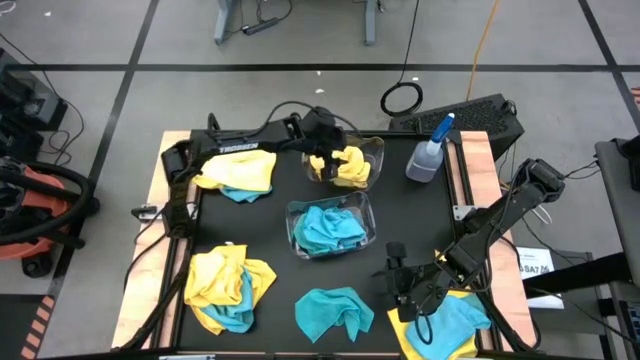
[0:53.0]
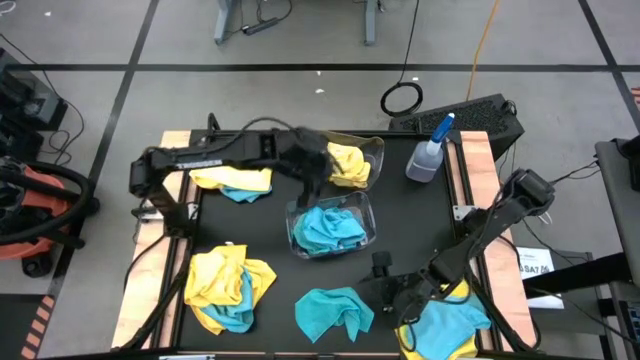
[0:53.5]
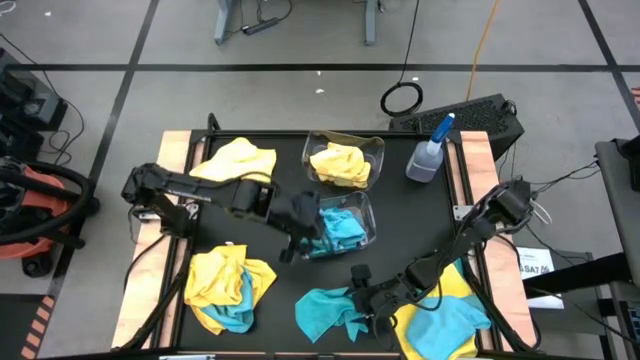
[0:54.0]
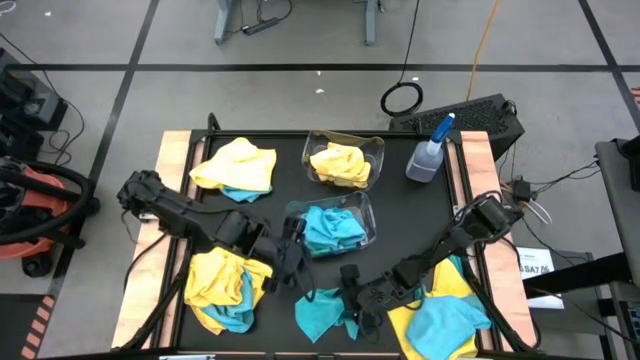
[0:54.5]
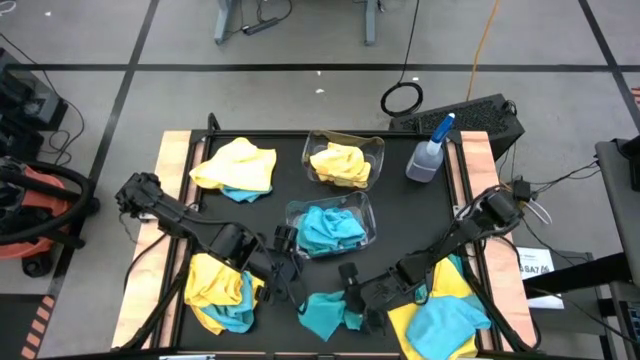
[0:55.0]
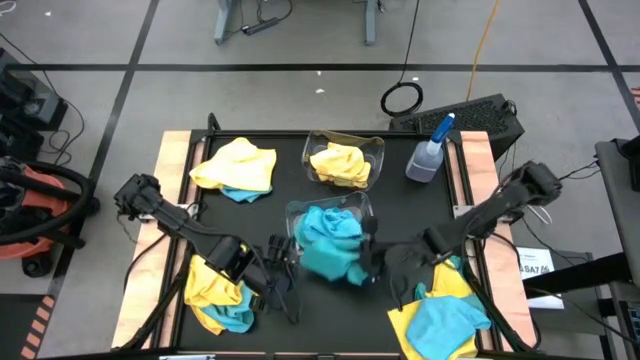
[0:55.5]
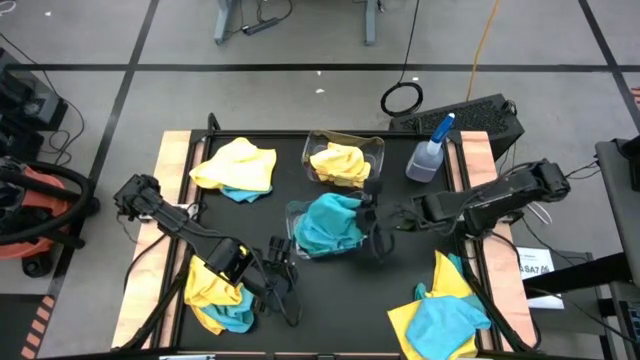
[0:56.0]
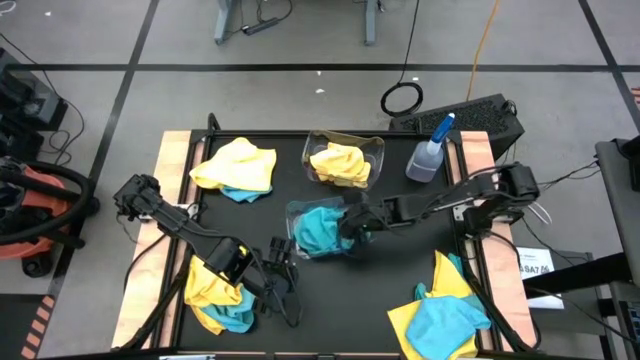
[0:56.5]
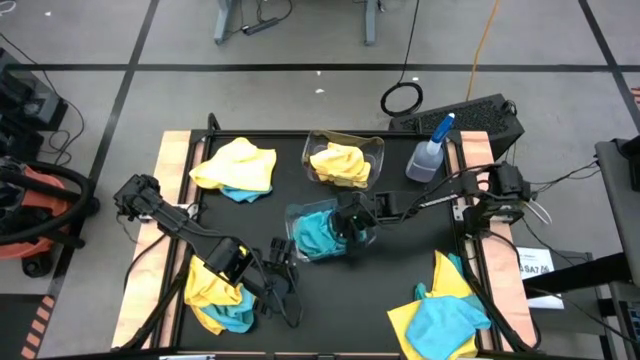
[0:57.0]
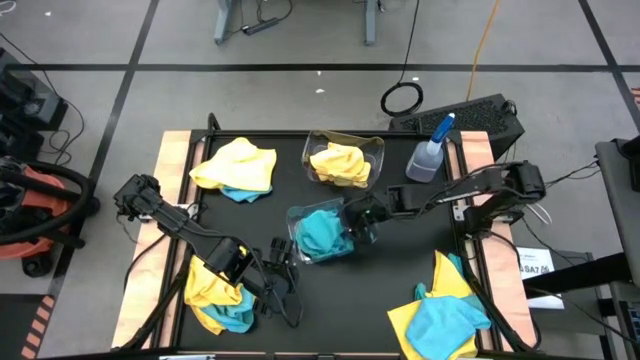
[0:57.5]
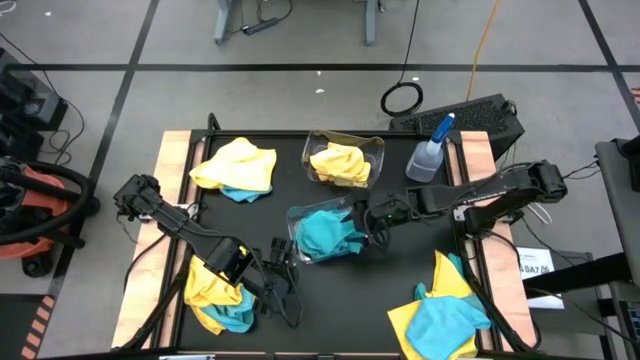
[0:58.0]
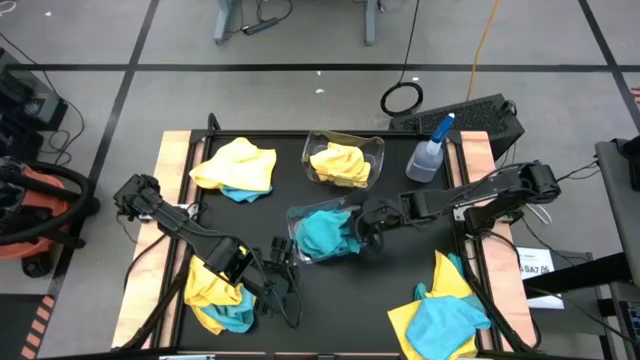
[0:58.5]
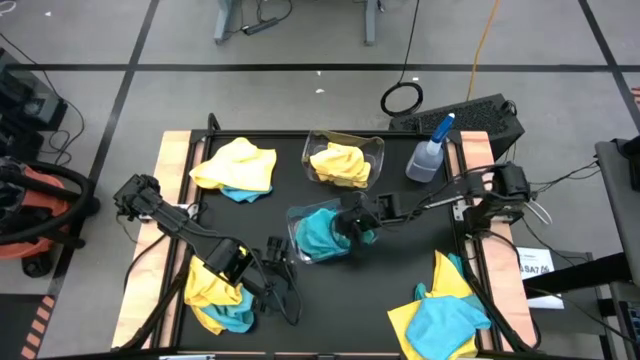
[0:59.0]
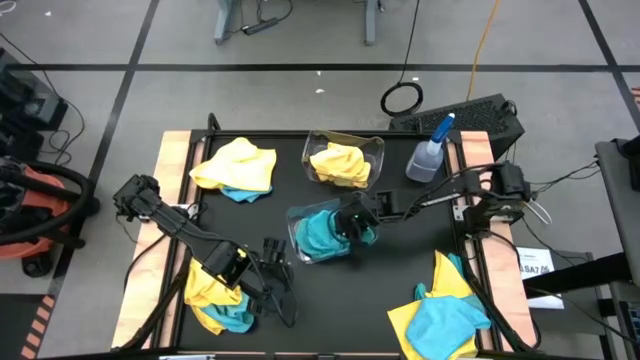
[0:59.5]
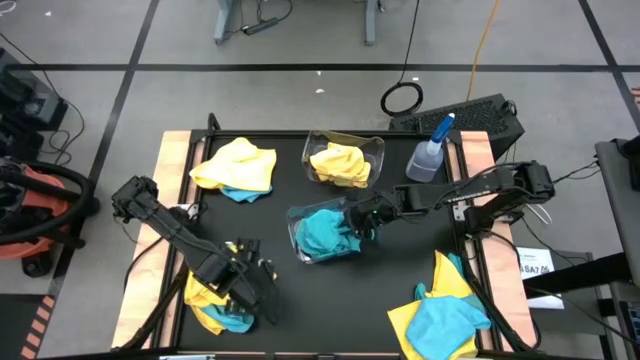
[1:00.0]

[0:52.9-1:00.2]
Task: Sort microfiber towel by color & place in baskets
Put the blue microfiber cloth into the bottom transparent bin

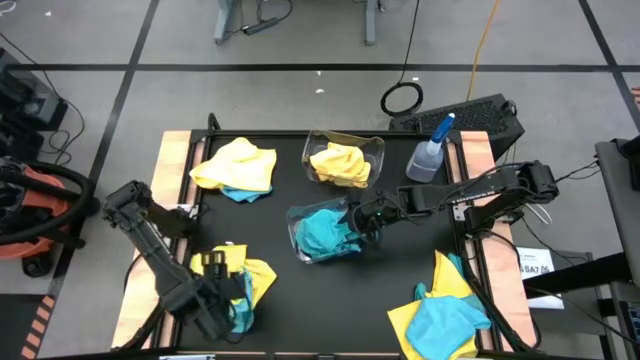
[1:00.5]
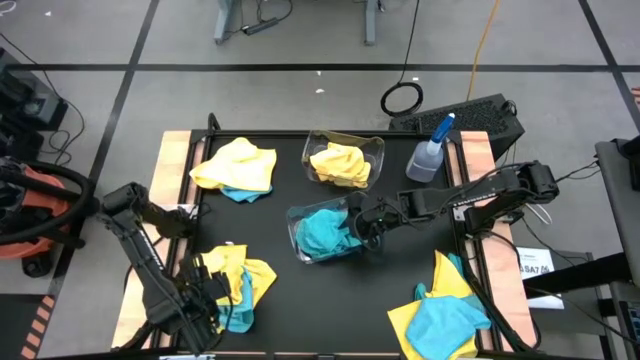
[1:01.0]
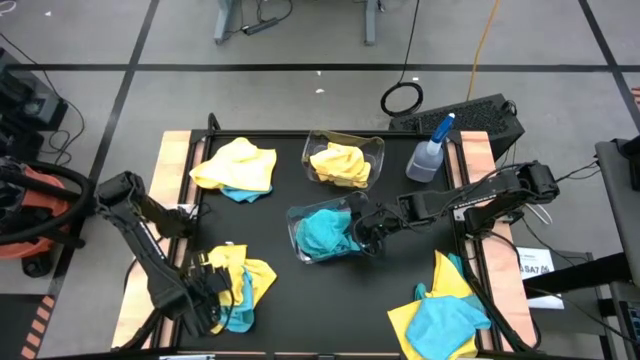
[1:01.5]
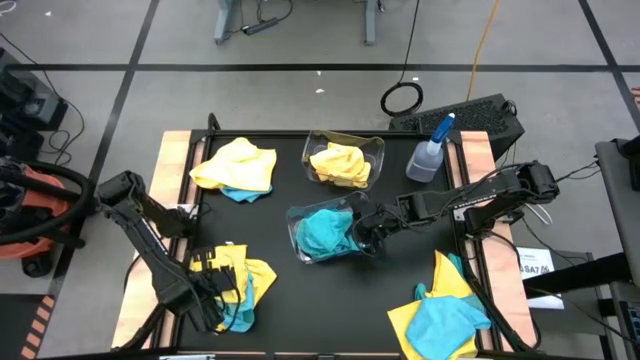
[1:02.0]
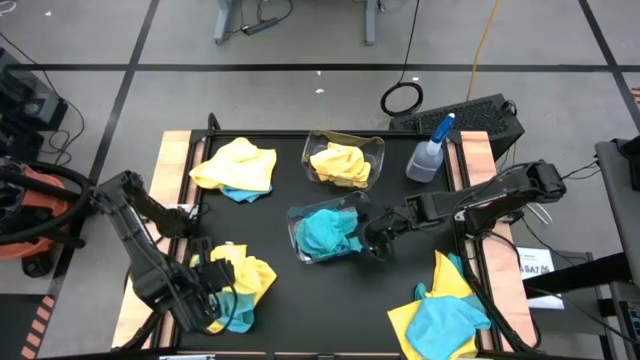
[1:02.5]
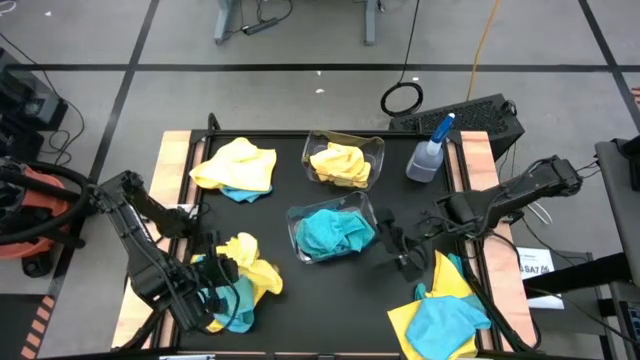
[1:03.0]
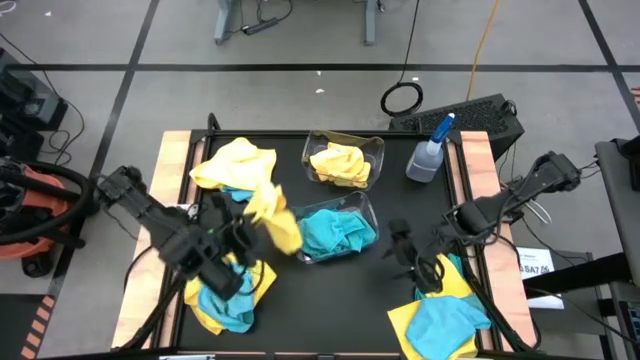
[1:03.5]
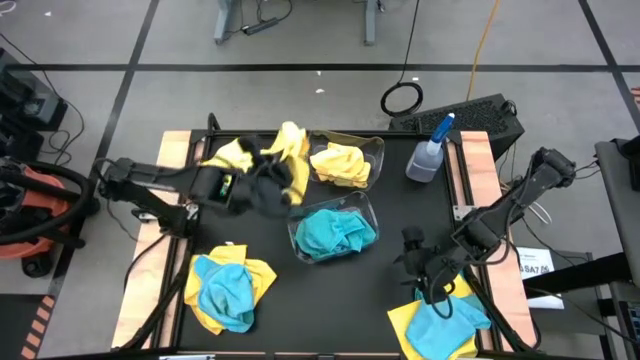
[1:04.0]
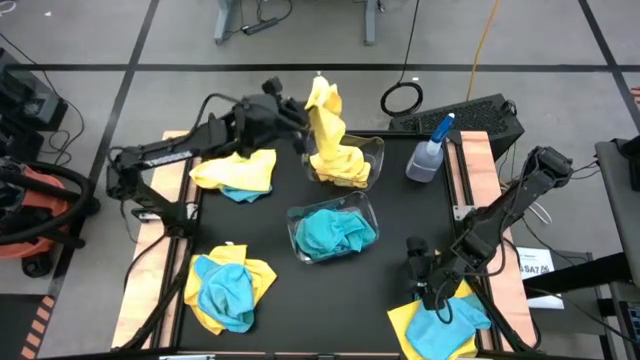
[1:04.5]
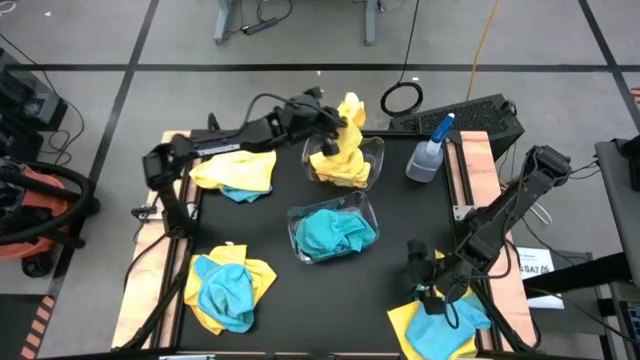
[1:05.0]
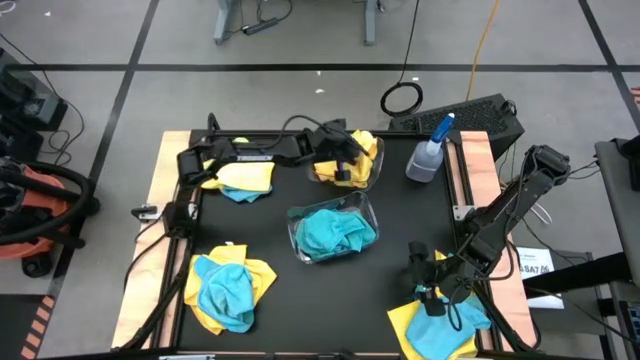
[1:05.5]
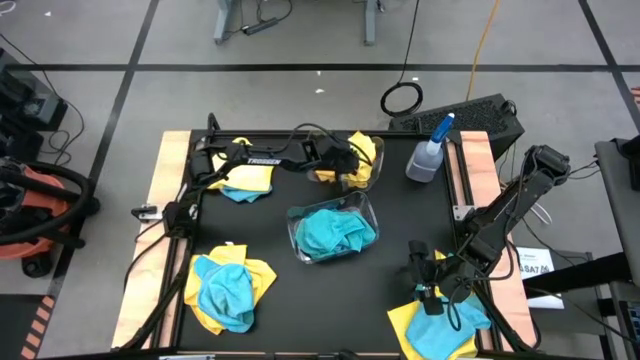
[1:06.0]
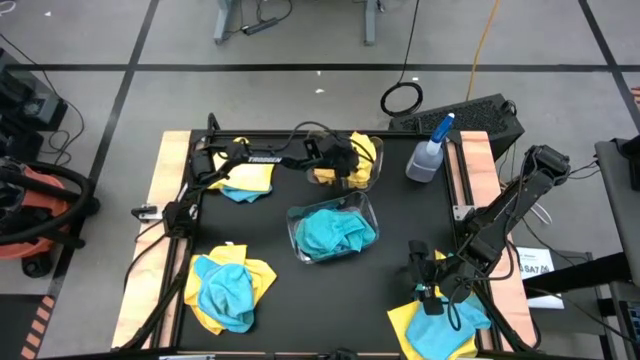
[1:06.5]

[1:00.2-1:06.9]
Put the yellow microfiber cloth into the top transparent bin

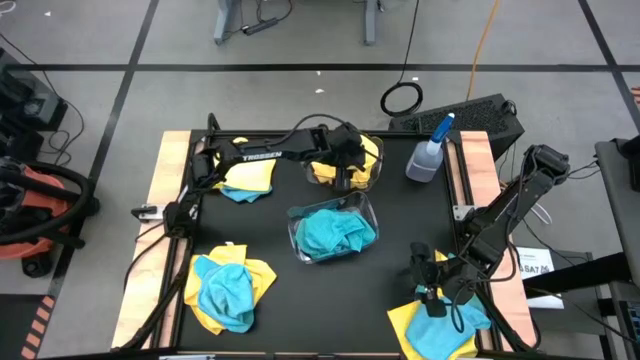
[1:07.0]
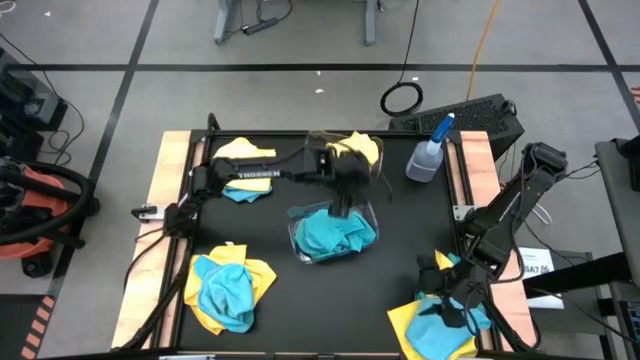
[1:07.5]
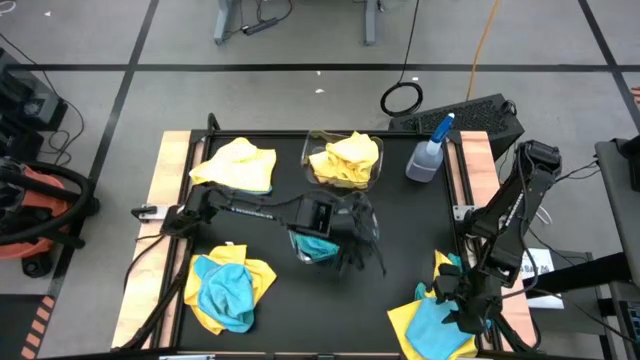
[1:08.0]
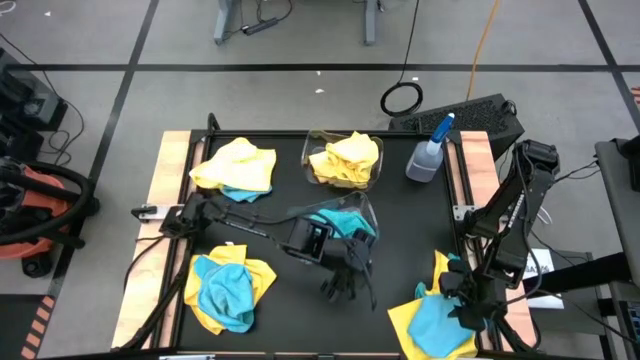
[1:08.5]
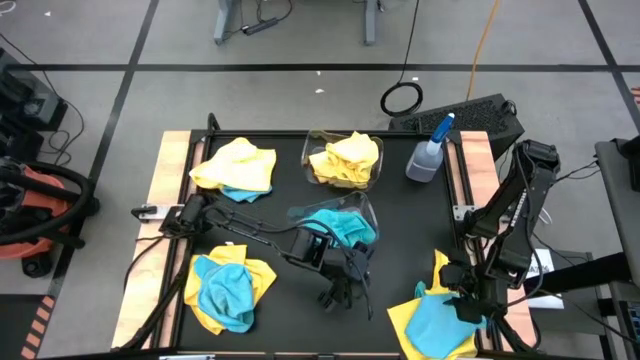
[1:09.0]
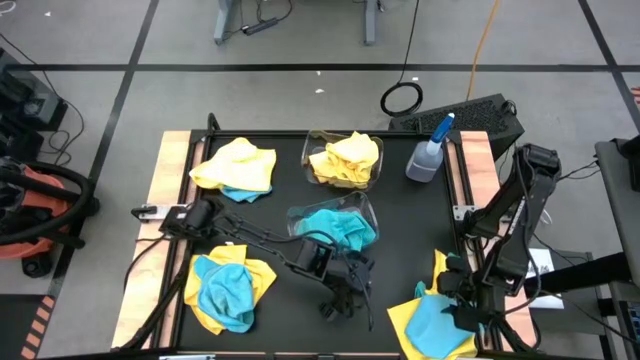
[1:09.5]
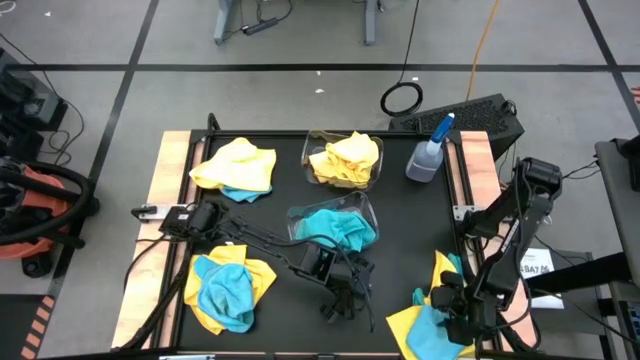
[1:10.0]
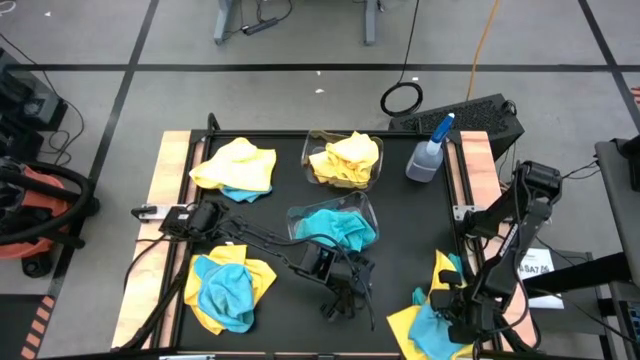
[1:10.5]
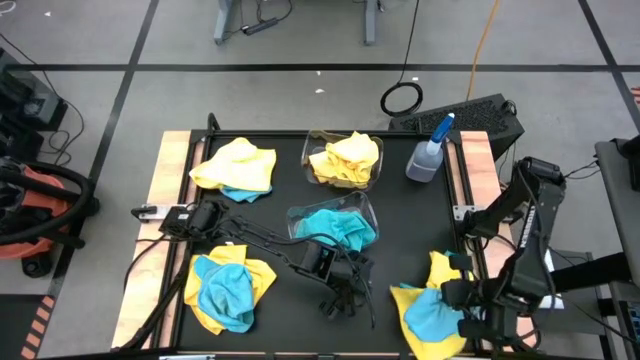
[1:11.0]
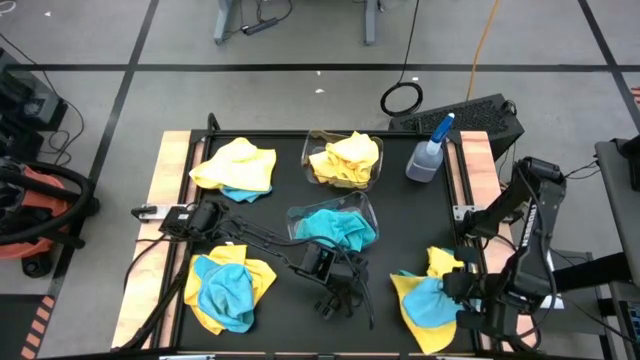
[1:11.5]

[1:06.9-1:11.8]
Put the blue microfiber cloth into the bottom transparent bin

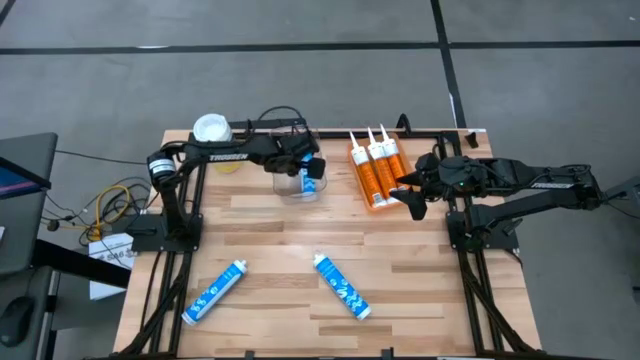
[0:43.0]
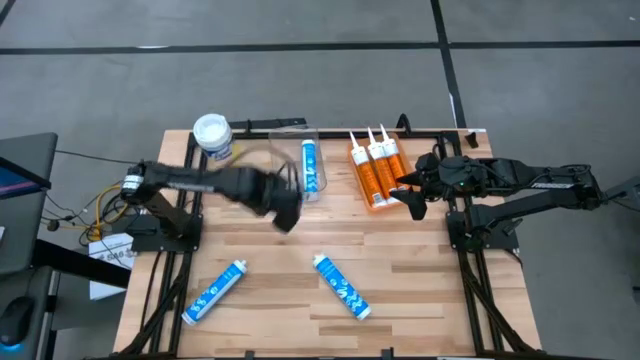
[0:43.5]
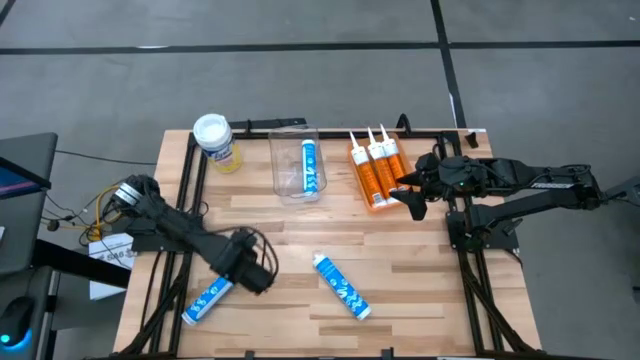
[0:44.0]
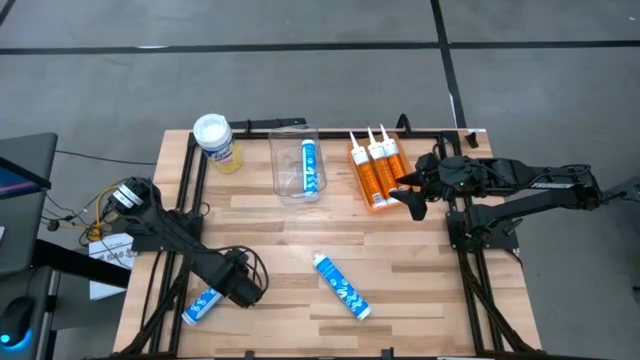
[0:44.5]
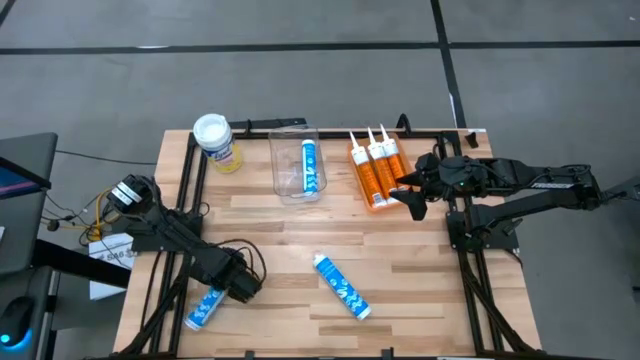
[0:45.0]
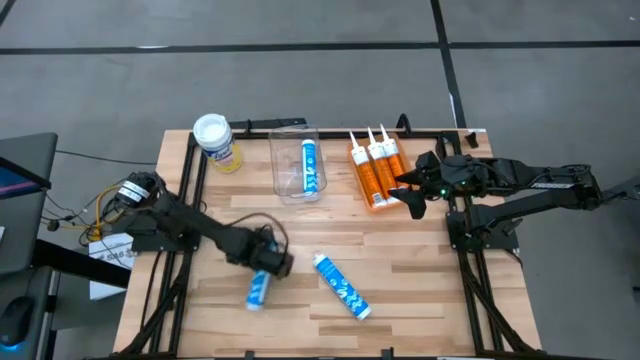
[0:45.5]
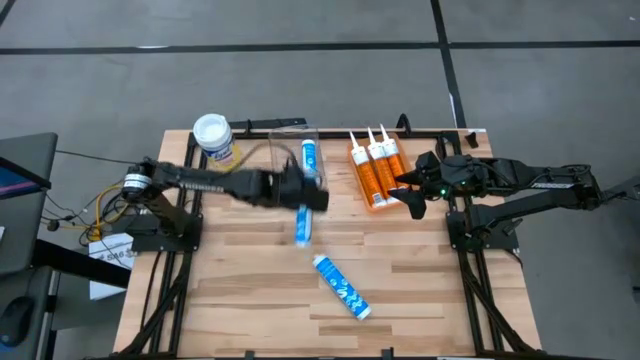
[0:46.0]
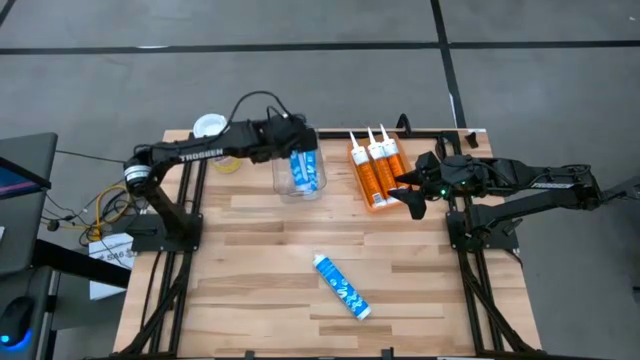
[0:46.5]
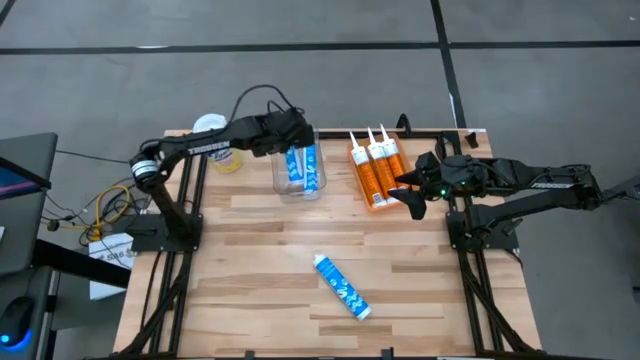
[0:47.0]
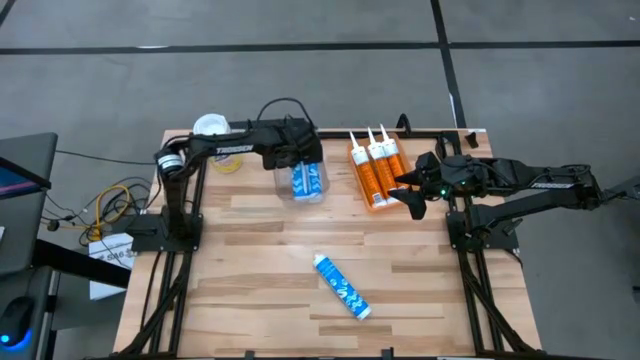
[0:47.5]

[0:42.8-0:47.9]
Task: Pick & place silicon tubes, Sealant and Lysol wipes
Put the left blue sealant into the transparent bin
